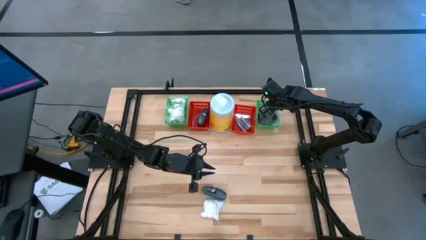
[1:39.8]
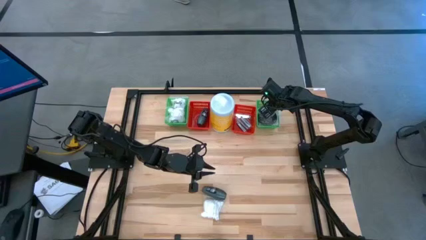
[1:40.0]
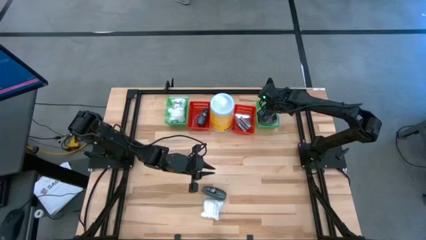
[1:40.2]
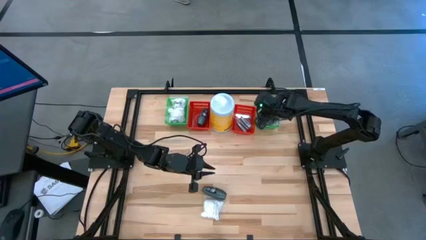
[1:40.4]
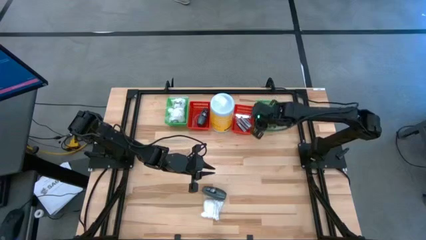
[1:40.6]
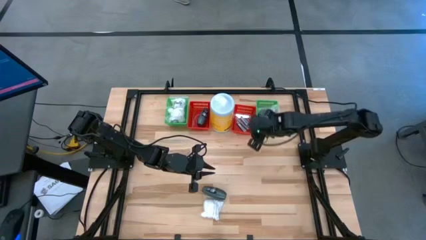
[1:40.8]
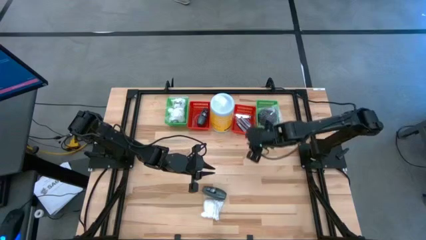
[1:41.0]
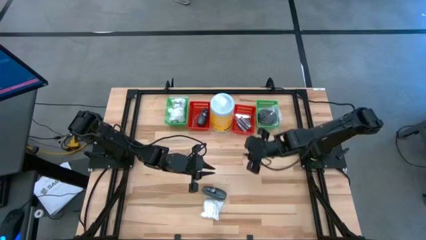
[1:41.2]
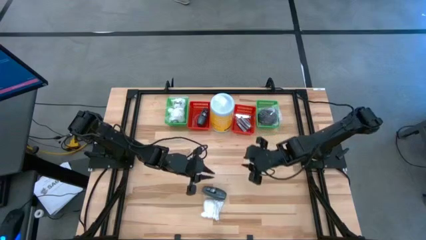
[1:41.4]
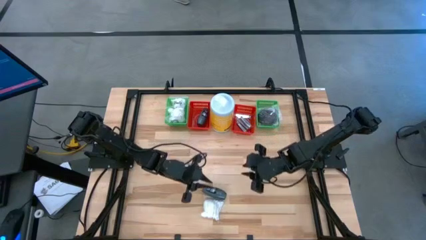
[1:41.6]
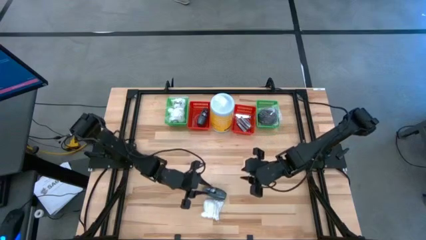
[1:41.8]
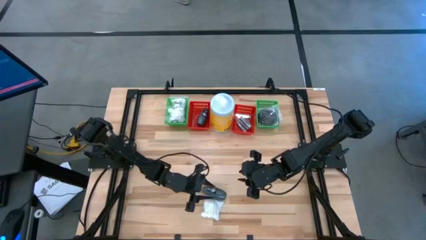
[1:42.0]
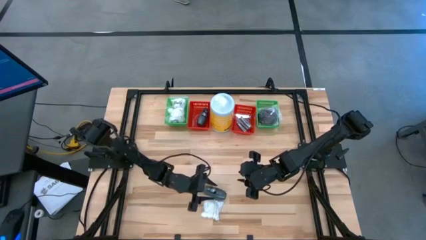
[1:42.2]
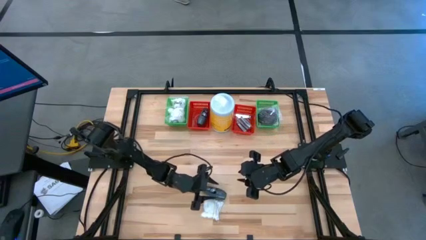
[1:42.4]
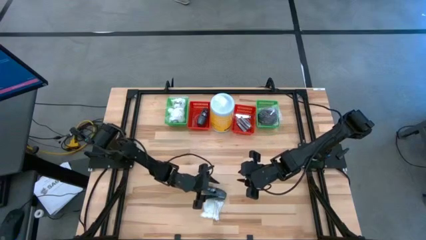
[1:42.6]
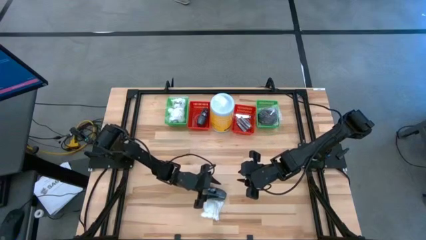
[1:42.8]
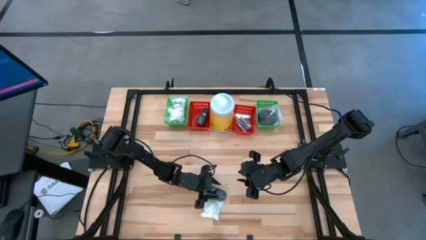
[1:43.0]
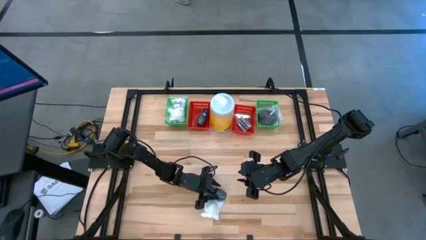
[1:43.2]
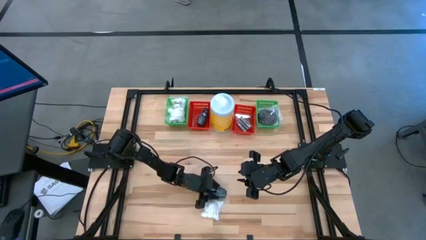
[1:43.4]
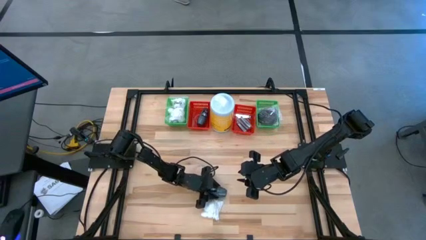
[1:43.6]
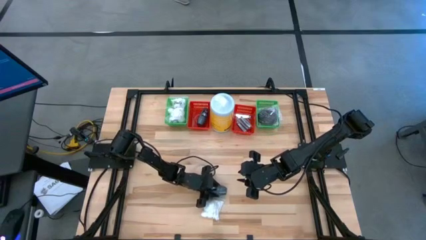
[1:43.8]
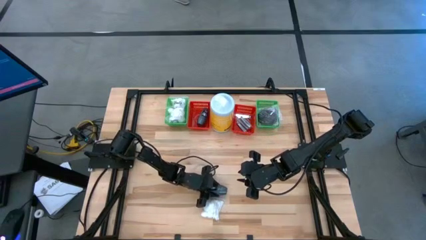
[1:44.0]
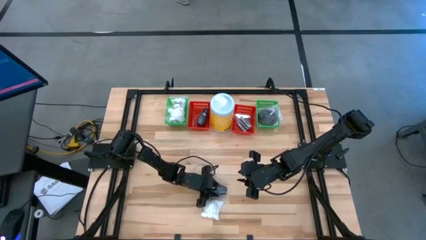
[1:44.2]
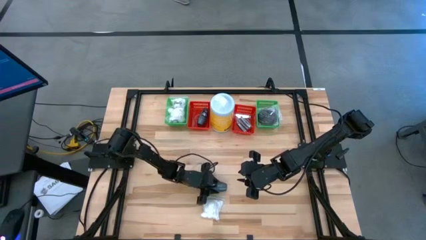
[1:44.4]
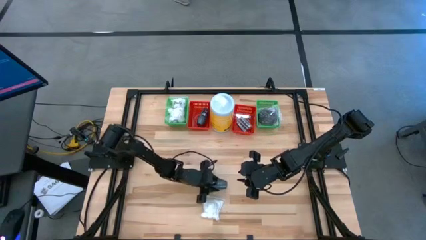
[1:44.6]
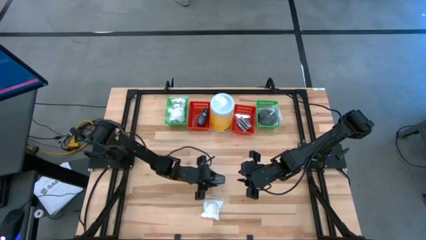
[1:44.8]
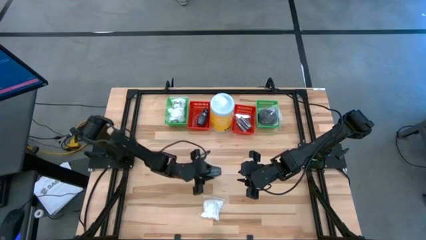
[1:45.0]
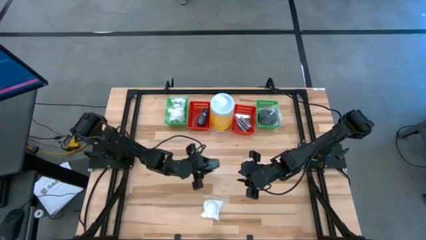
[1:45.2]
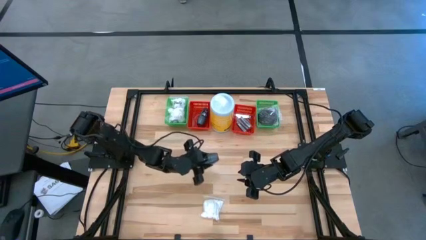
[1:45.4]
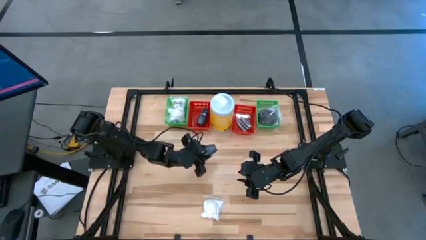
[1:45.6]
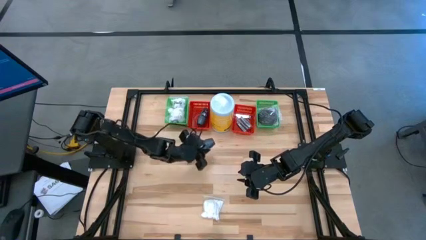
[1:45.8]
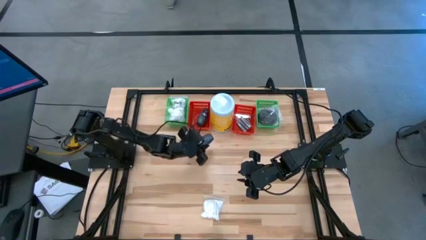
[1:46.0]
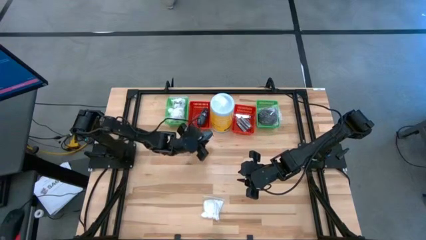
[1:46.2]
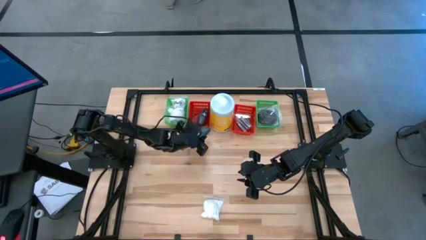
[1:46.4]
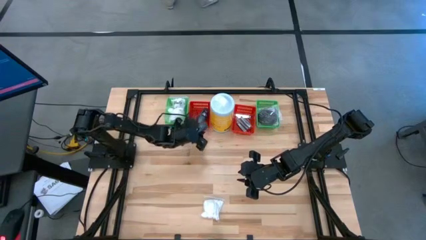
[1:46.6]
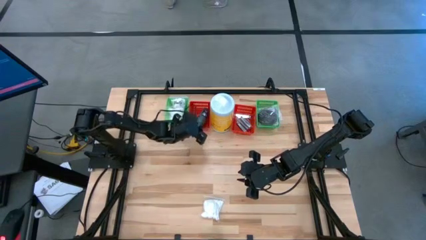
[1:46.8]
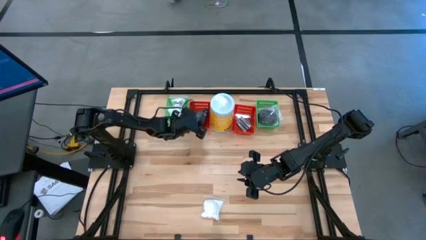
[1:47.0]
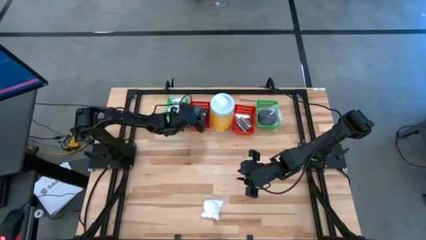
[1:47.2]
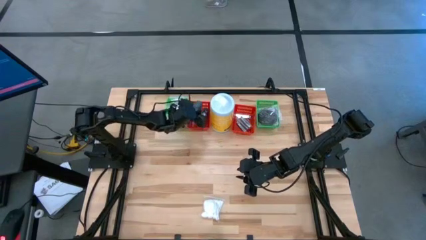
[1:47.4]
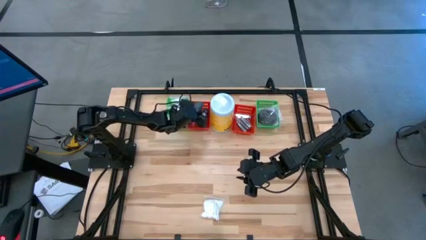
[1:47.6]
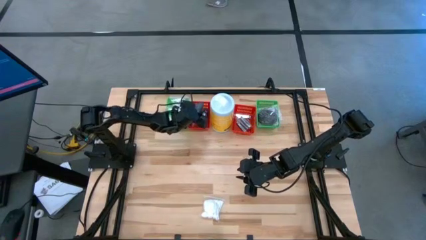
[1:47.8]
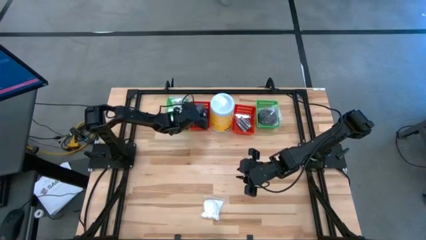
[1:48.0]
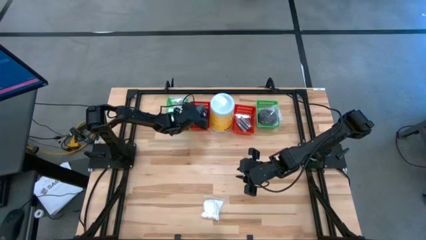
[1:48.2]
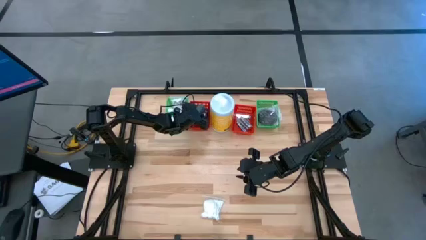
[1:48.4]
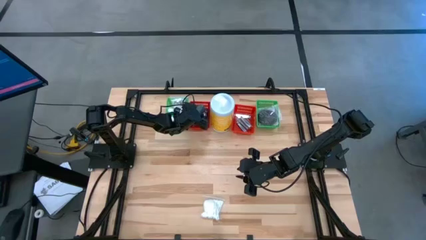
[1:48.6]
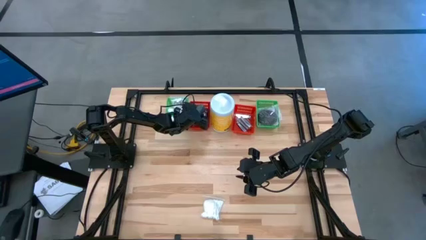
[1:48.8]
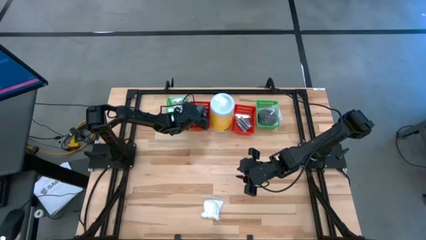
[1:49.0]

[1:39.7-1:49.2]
Task: Pick & Place Travel size toiletries
Put the black deodorant into the left red bin

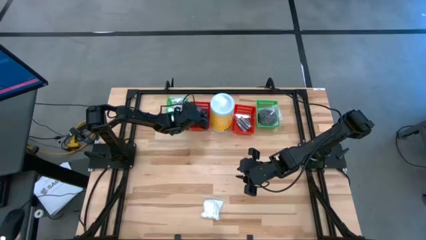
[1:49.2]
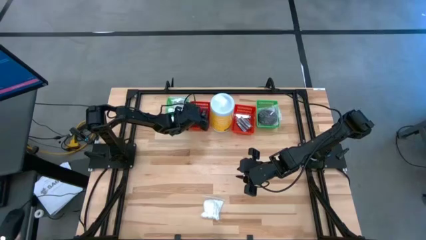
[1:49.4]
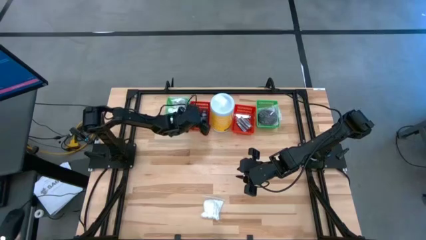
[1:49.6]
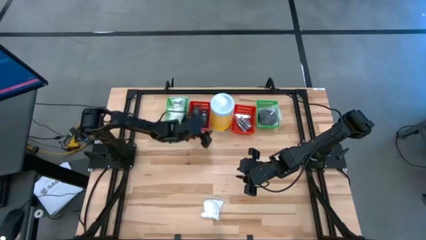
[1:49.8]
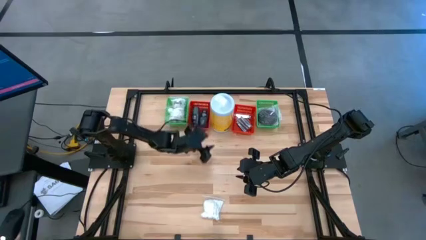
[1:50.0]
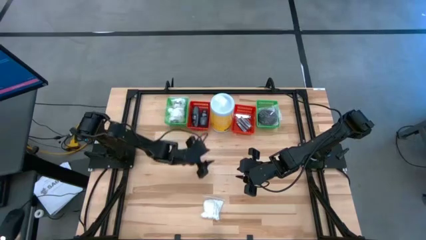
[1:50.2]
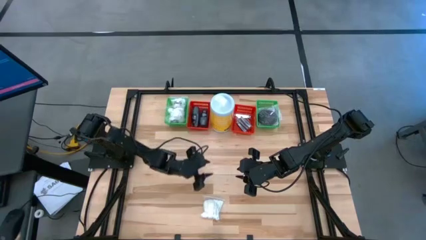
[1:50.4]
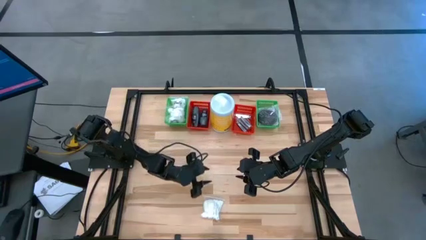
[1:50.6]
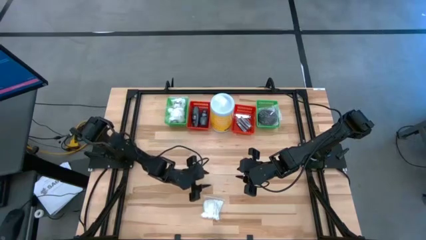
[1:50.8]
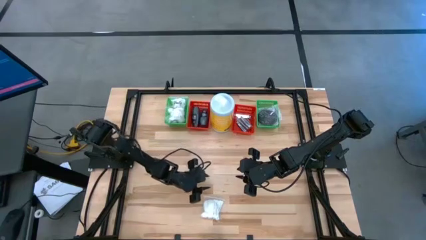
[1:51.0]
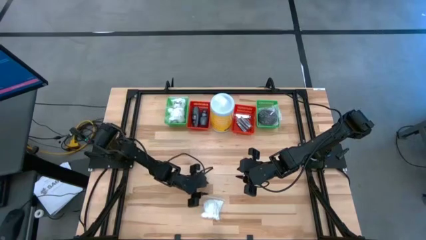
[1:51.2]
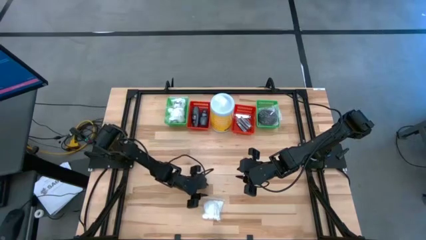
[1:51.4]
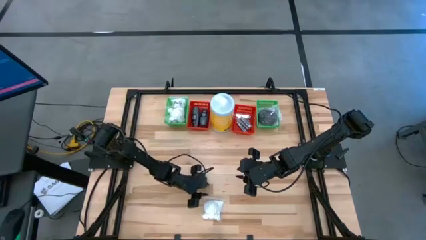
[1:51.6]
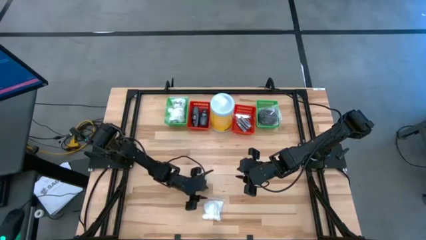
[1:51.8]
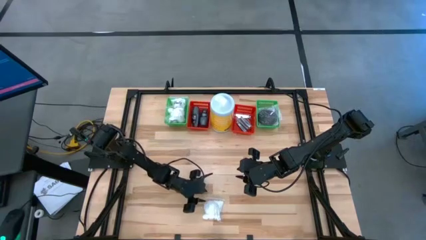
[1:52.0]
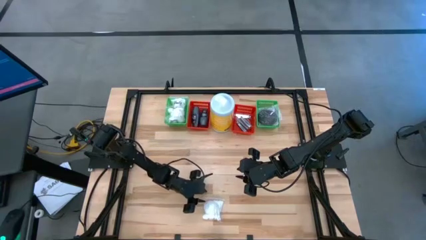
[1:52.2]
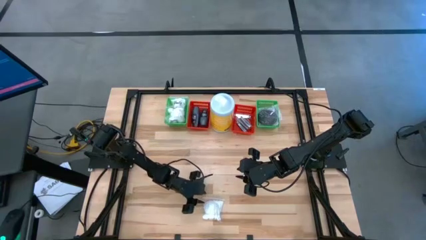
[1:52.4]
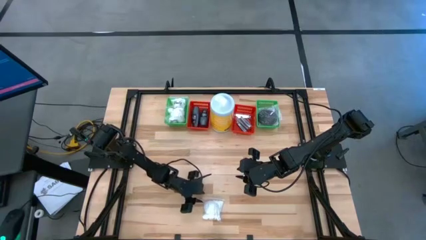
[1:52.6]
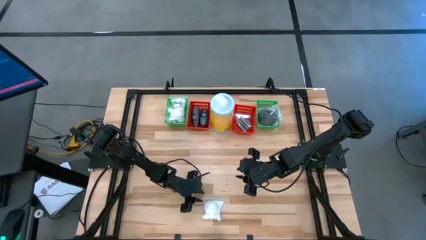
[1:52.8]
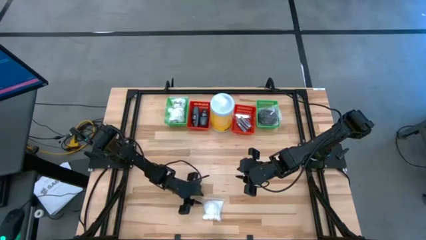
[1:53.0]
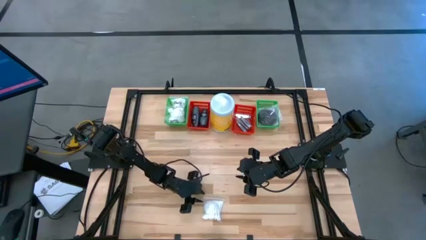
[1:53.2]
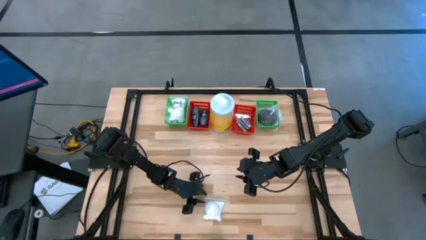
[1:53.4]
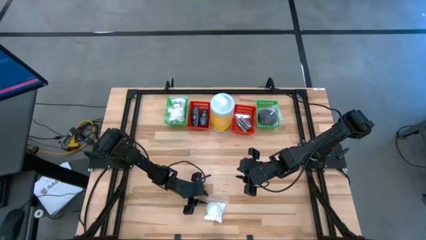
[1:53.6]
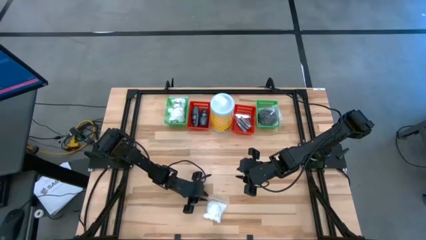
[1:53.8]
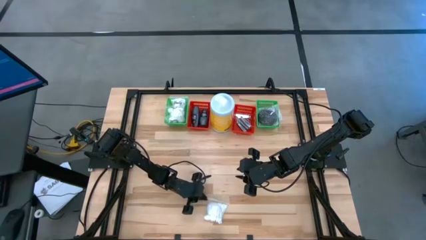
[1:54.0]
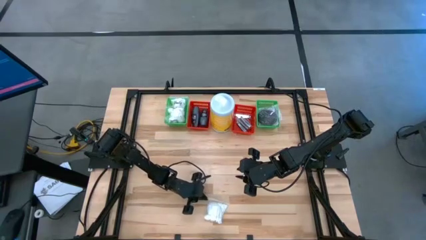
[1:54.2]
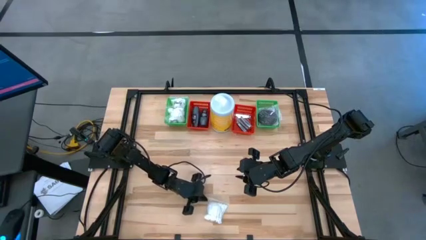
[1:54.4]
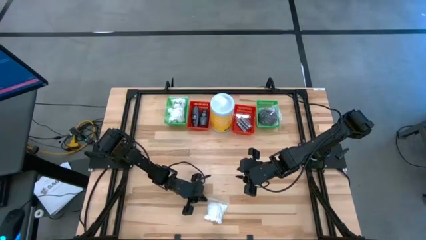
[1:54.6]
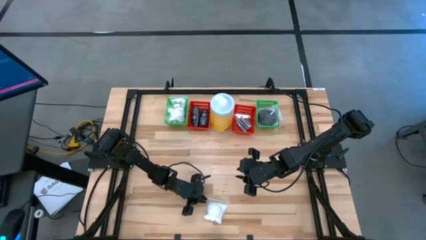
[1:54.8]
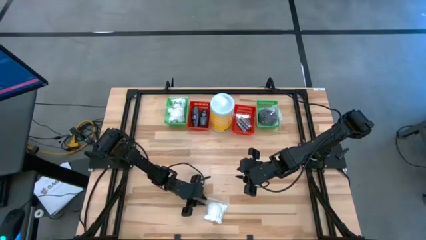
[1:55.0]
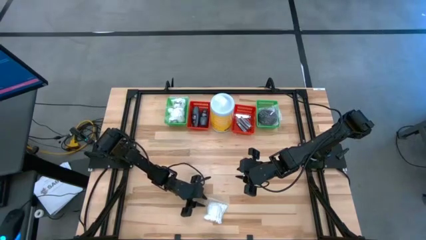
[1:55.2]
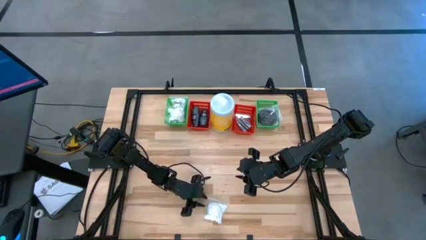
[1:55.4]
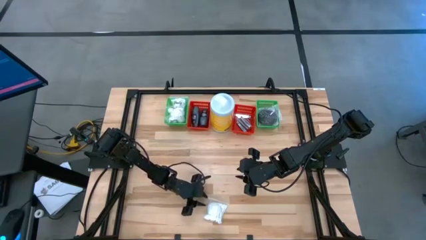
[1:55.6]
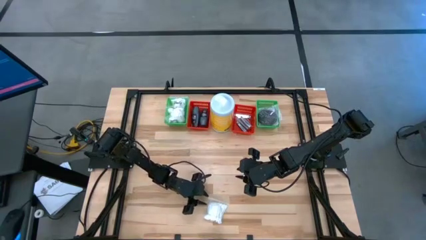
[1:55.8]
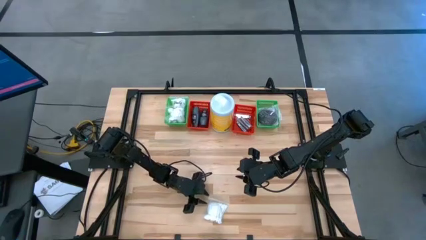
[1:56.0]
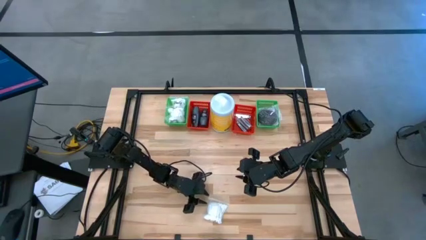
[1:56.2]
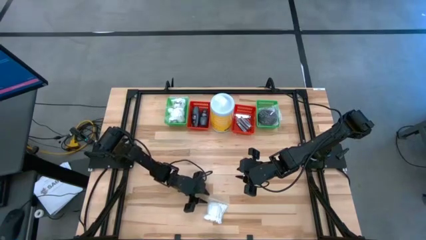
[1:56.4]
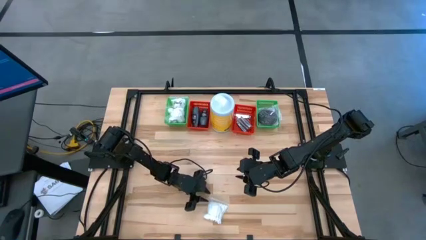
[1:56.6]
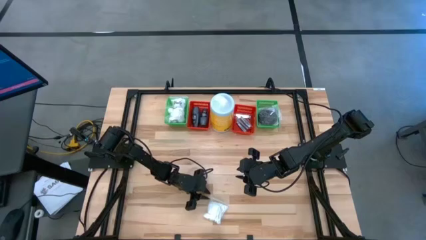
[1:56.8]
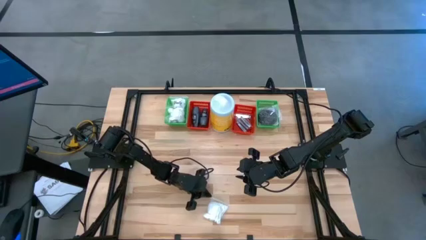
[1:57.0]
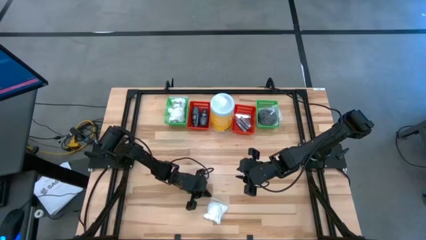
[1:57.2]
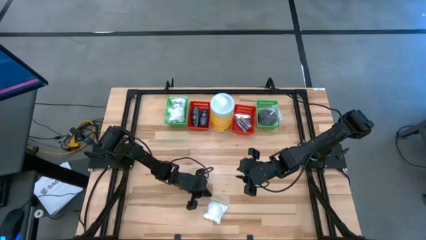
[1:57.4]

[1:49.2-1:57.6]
Put the white cotton pack into the left green bin
